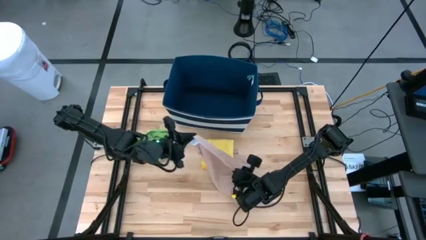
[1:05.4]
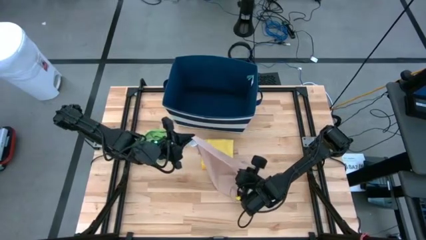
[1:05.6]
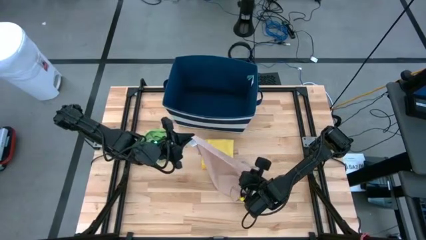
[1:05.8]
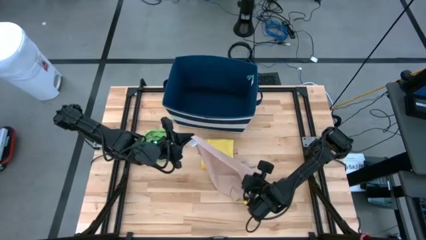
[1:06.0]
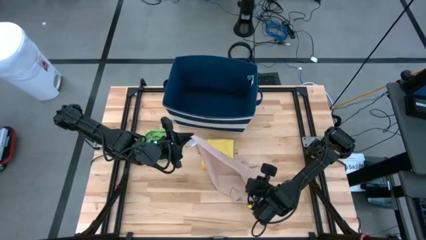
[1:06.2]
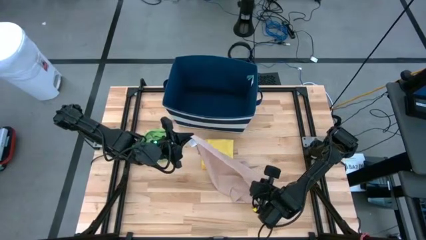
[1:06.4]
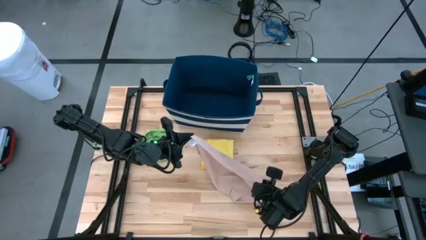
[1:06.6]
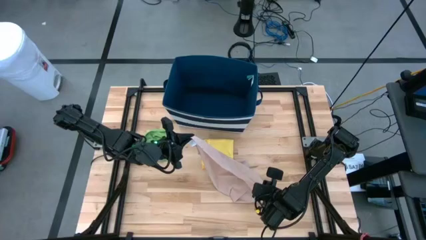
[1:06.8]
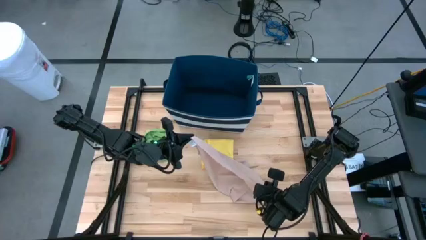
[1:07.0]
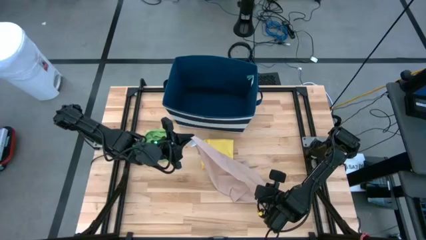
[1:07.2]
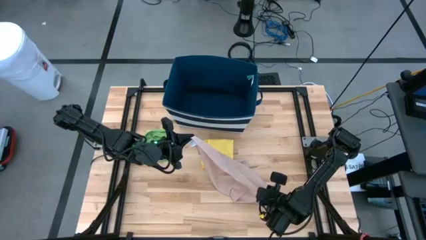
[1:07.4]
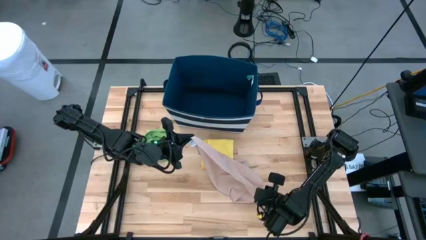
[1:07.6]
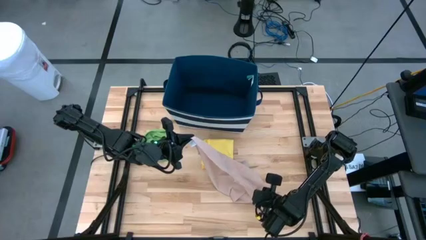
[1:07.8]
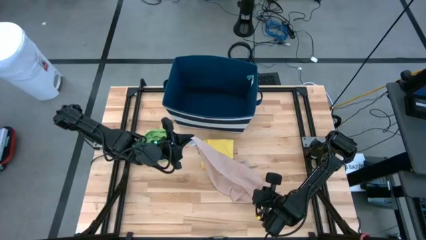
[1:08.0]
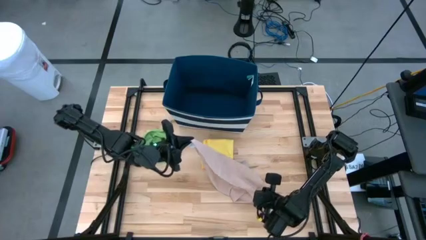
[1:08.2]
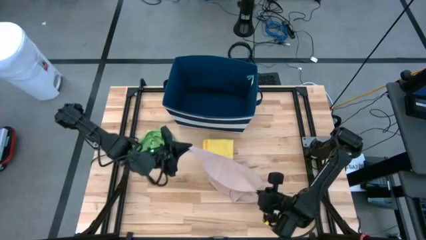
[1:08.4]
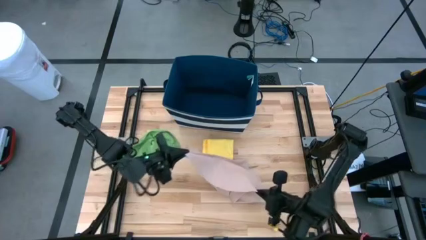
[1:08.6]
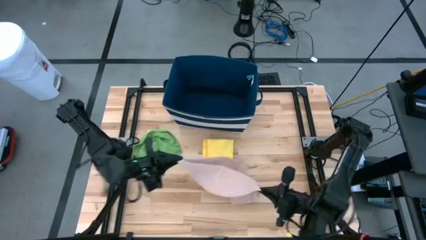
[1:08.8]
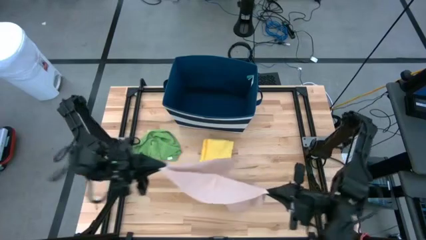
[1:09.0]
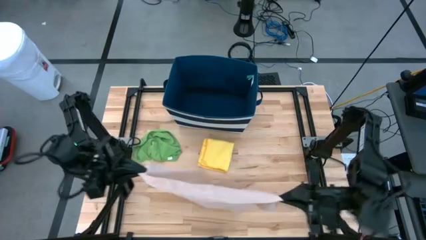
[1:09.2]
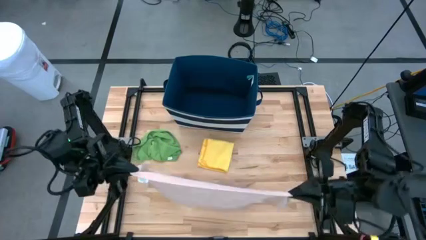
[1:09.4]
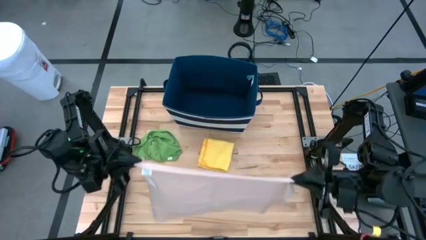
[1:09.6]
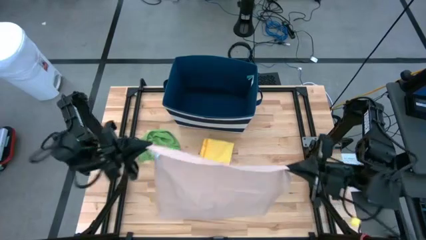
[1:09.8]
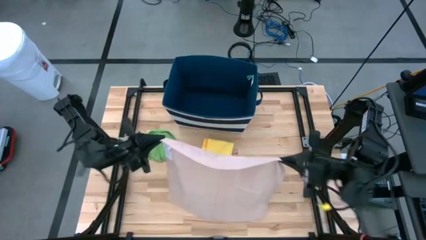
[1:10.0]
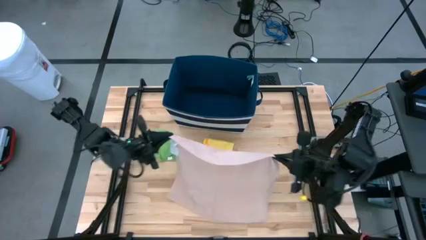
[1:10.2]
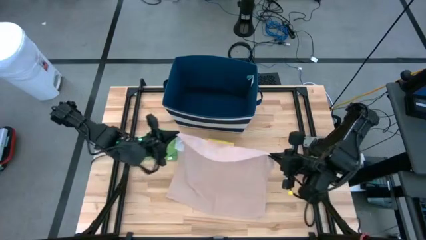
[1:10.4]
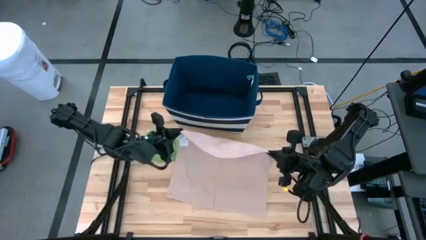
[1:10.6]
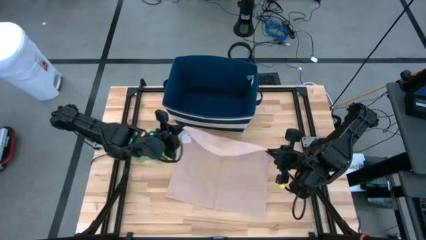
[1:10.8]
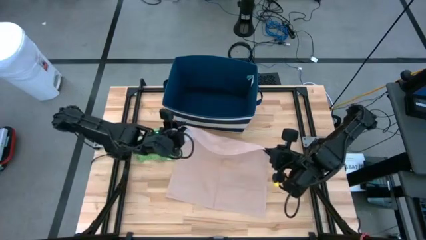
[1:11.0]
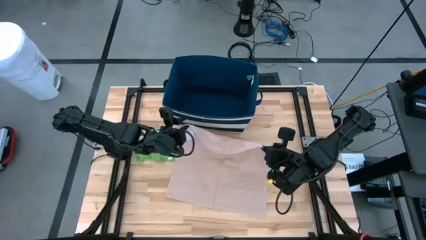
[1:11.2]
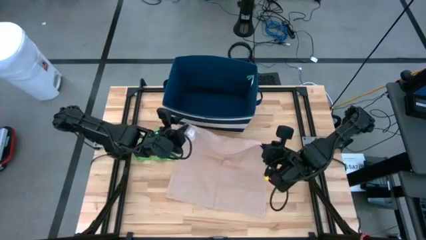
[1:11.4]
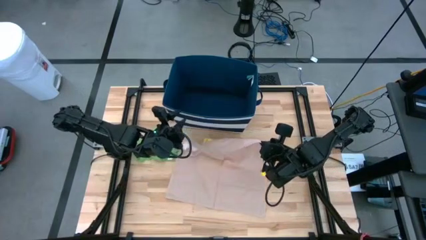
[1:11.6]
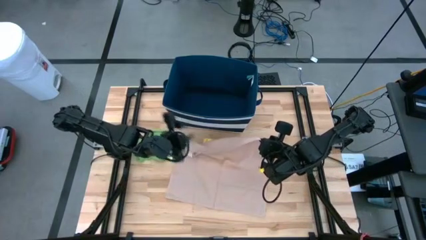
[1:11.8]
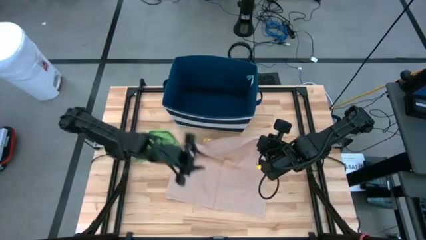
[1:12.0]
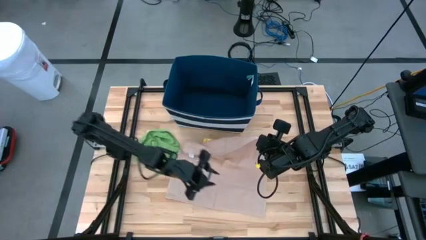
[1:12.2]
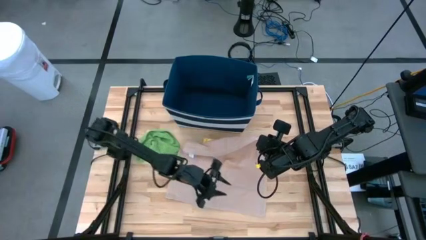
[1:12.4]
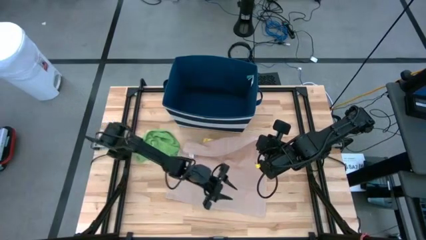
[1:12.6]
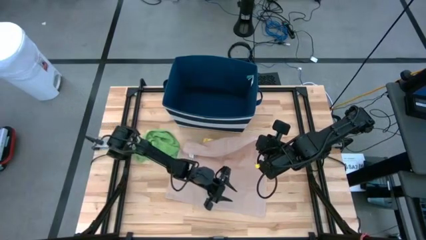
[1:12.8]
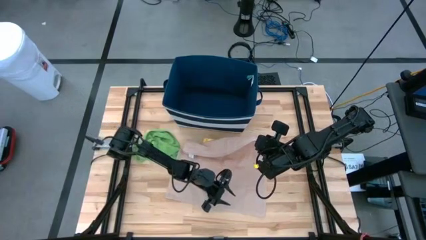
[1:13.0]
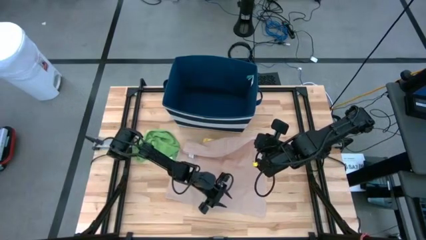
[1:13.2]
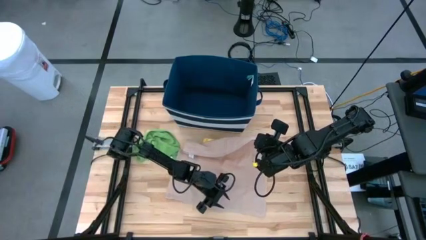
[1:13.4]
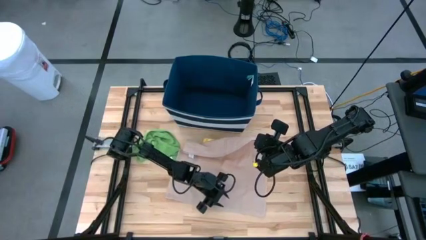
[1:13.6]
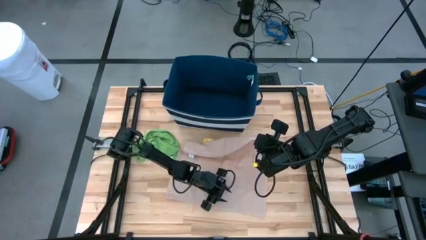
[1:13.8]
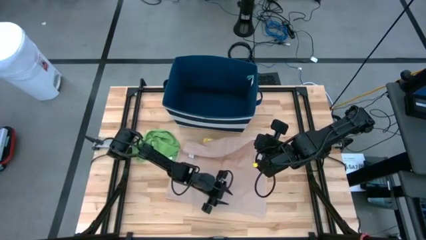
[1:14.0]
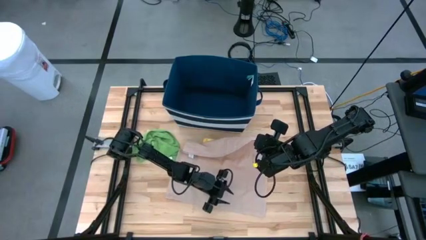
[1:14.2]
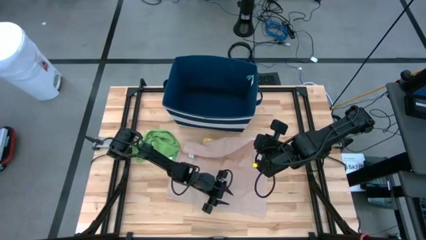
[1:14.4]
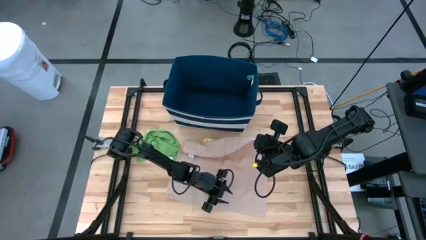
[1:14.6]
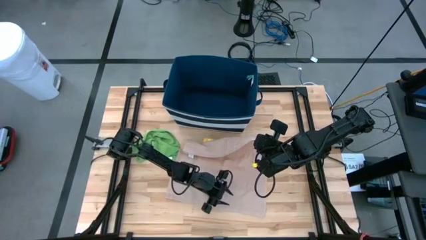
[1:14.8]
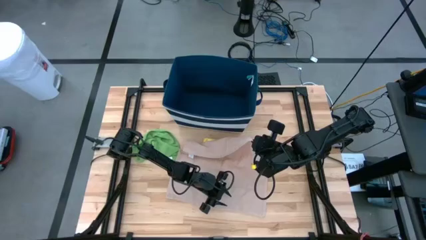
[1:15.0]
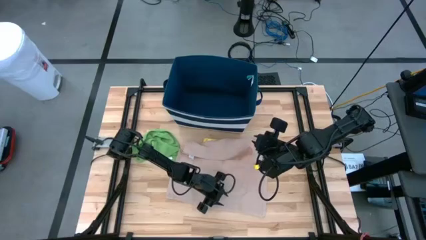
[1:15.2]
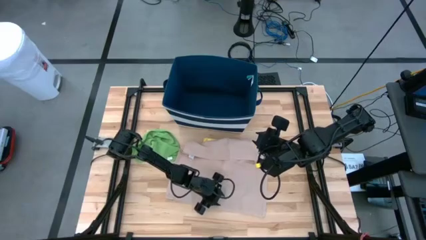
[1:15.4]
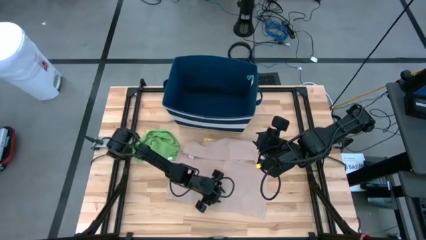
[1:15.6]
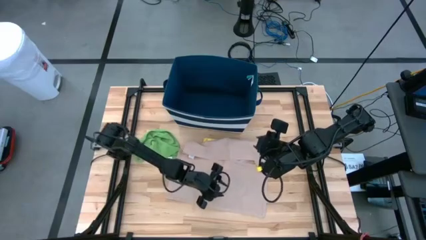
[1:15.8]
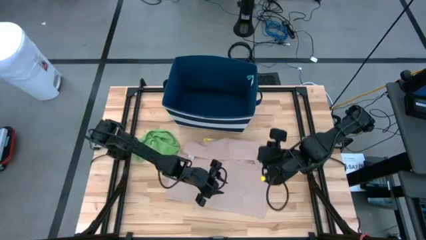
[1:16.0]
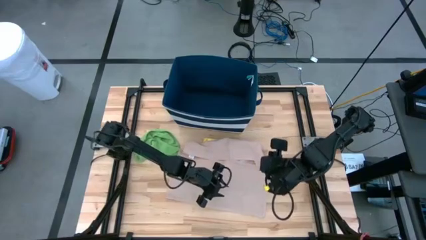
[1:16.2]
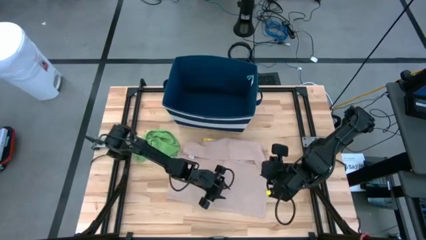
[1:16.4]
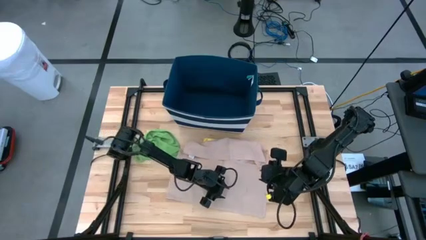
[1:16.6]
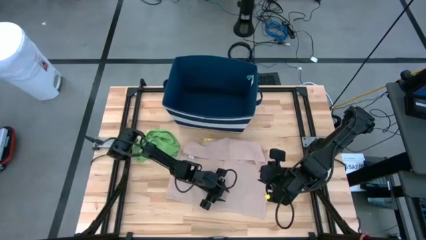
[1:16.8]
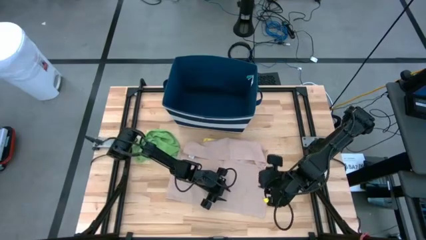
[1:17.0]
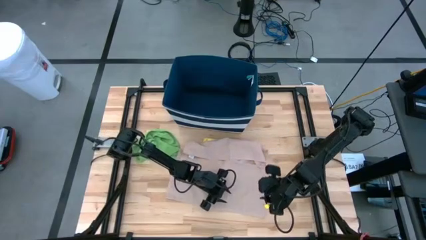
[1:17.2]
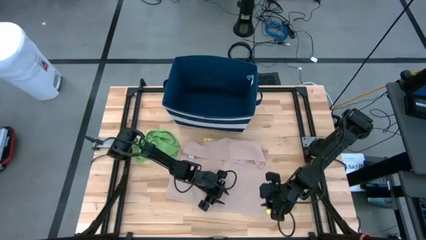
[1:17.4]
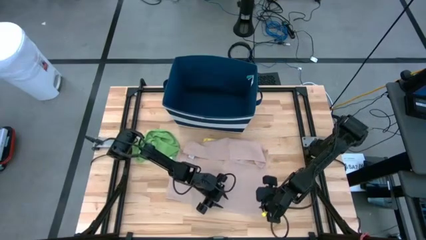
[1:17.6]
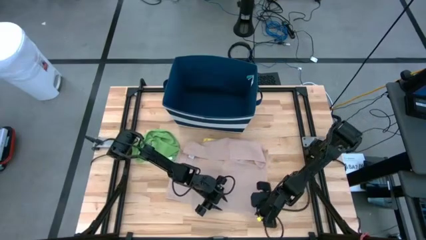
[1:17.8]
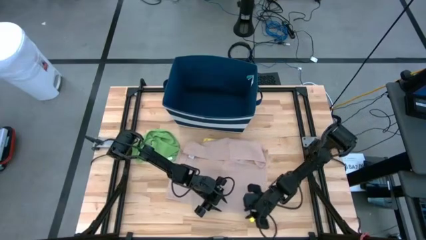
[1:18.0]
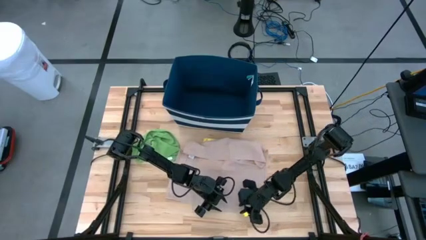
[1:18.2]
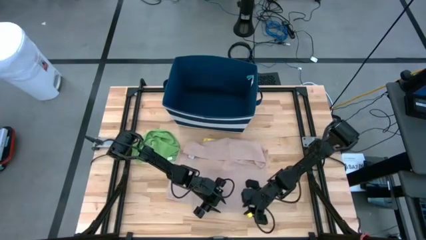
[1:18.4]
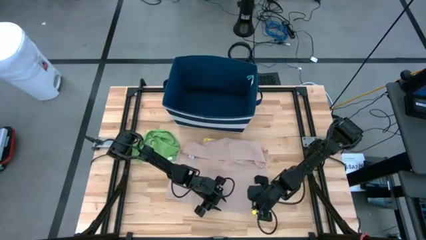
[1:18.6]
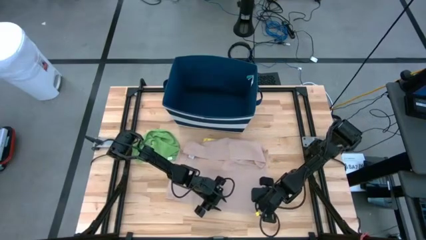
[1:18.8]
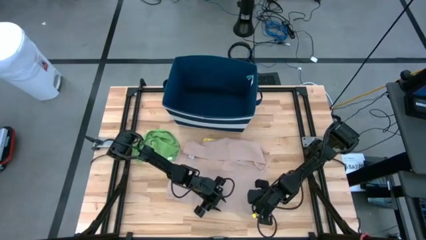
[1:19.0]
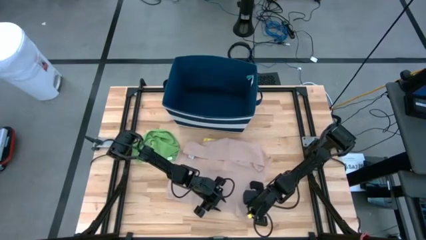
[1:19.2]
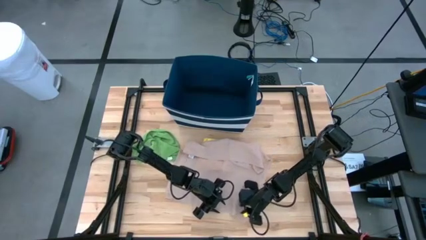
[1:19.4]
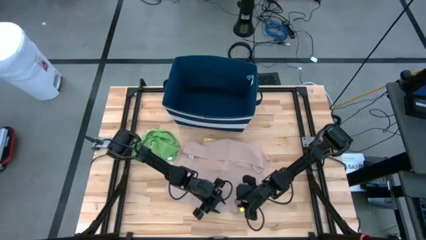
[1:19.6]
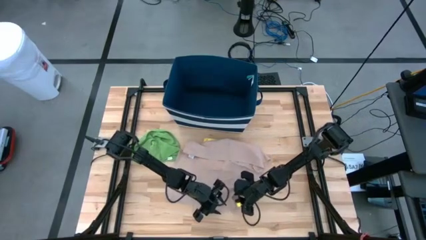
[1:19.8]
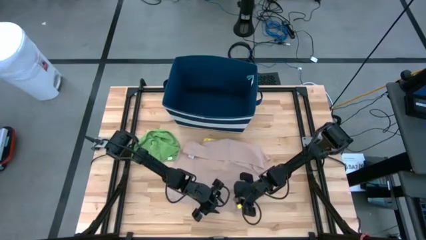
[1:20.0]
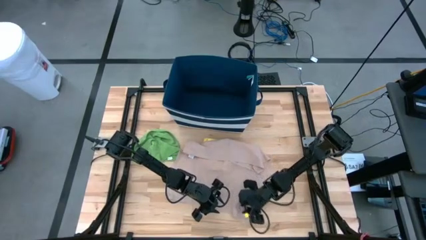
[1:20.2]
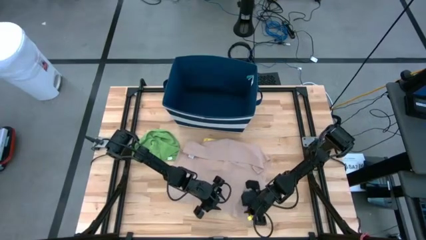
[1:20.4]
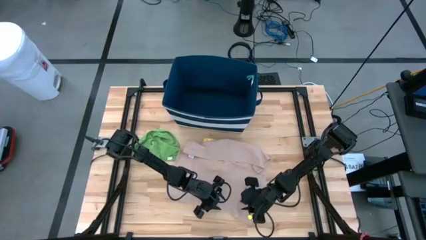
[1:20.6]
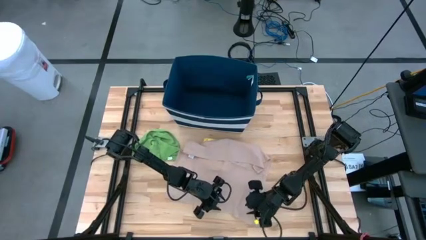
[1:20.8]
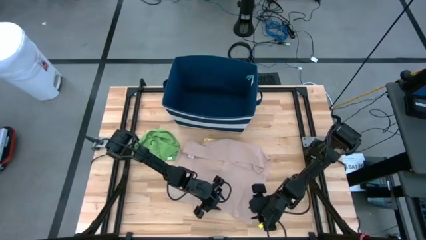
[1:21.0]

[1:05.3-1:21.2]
Task: Fold towel
Fold the brown towel
